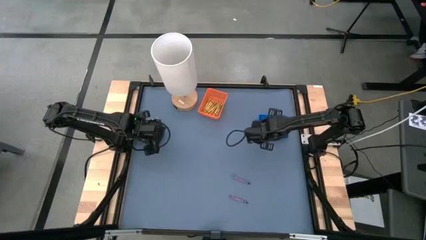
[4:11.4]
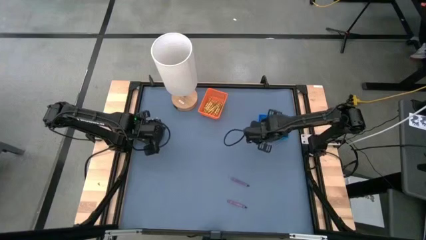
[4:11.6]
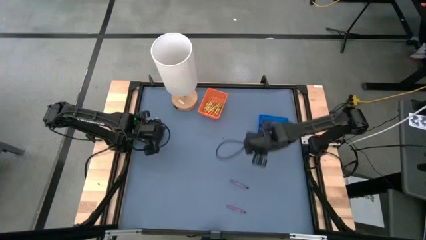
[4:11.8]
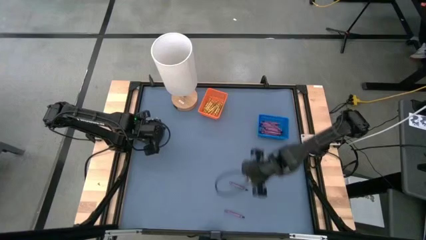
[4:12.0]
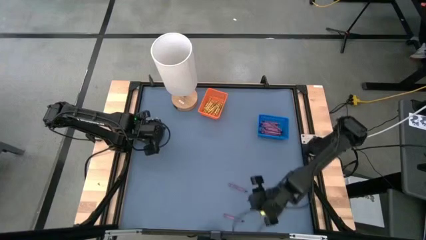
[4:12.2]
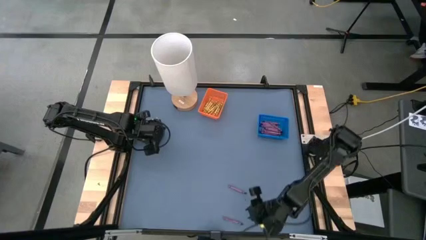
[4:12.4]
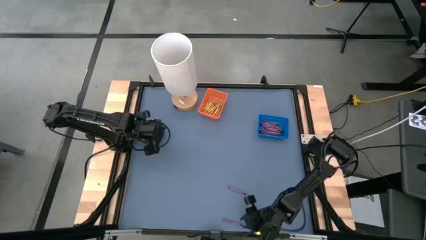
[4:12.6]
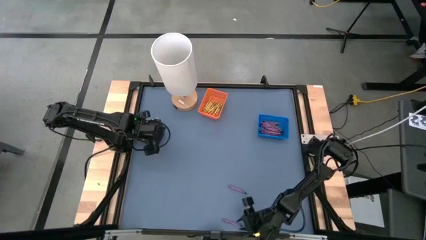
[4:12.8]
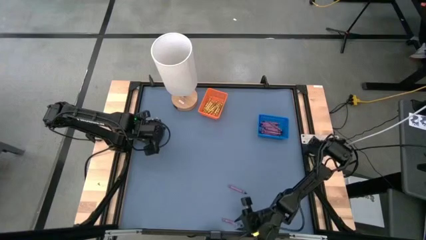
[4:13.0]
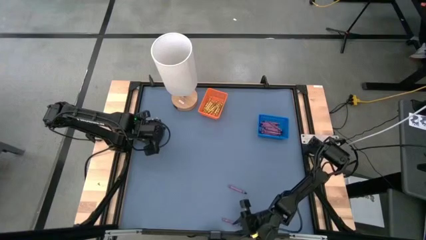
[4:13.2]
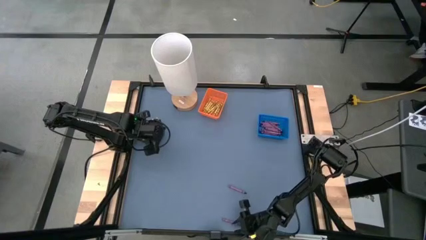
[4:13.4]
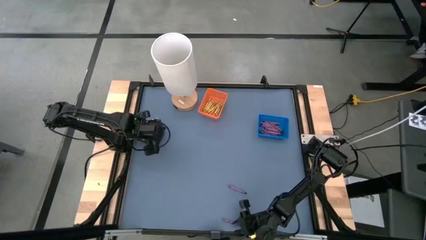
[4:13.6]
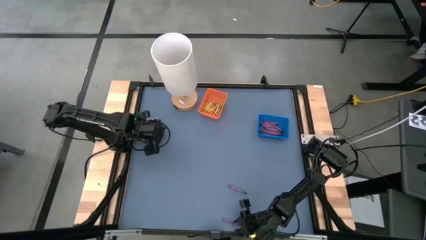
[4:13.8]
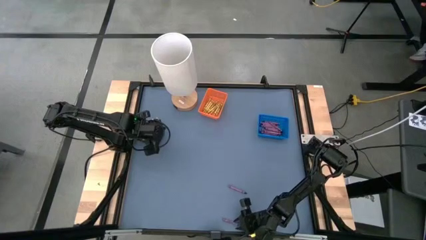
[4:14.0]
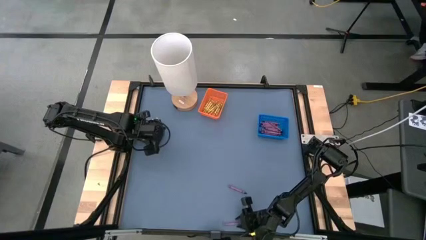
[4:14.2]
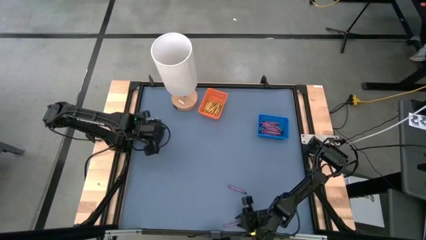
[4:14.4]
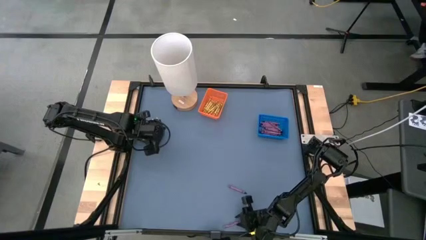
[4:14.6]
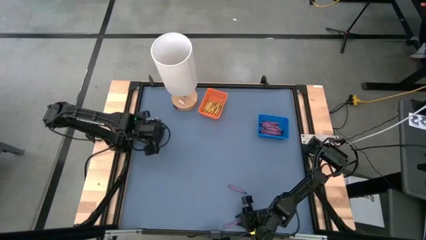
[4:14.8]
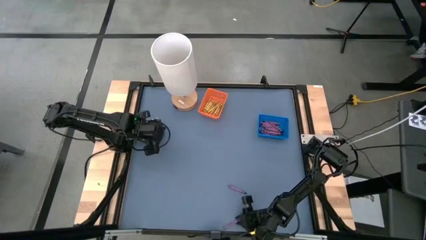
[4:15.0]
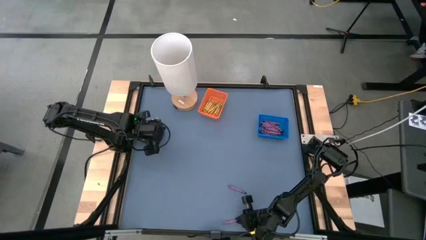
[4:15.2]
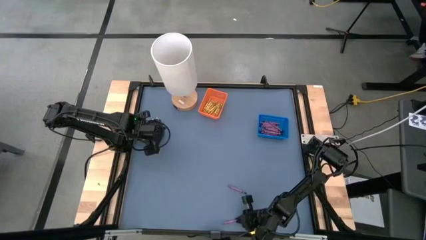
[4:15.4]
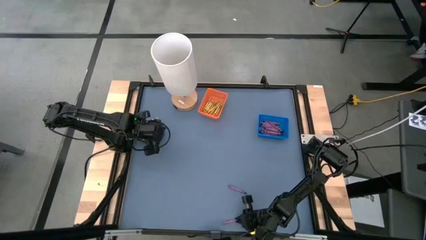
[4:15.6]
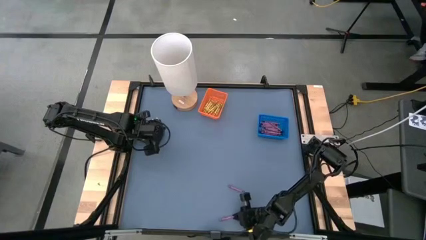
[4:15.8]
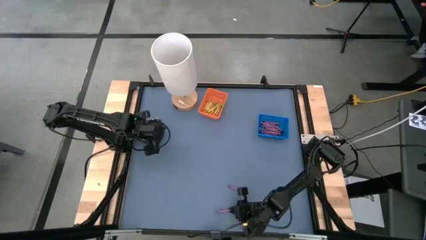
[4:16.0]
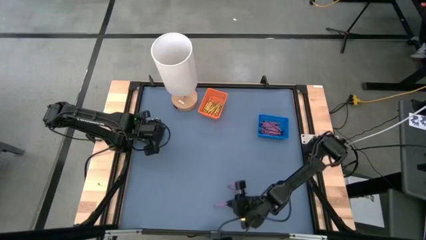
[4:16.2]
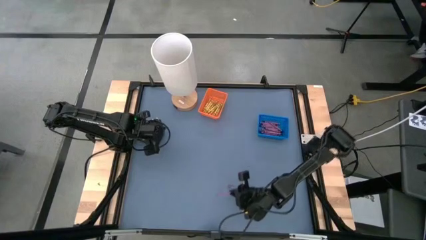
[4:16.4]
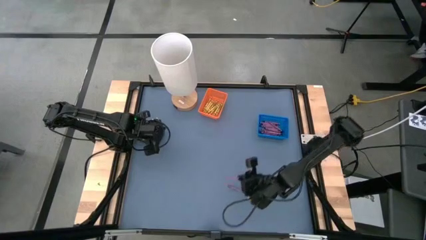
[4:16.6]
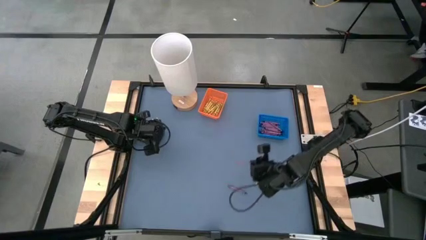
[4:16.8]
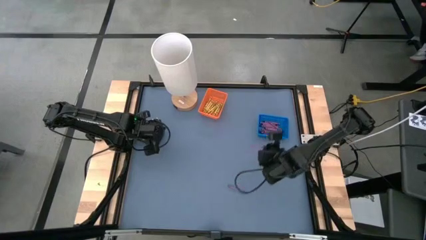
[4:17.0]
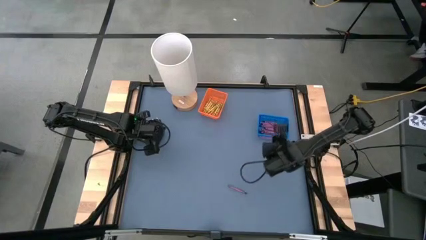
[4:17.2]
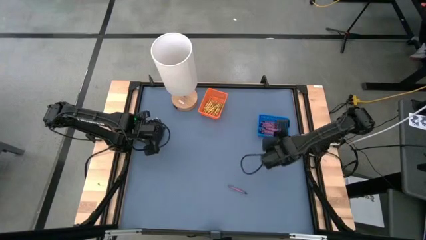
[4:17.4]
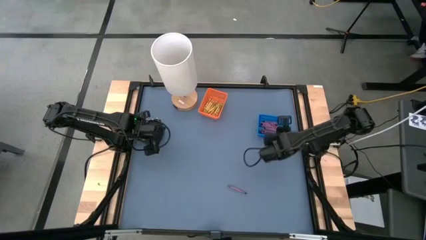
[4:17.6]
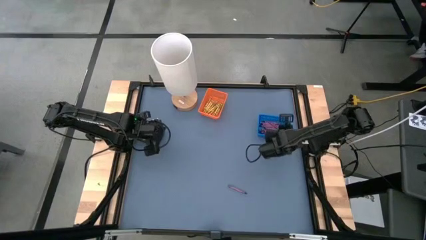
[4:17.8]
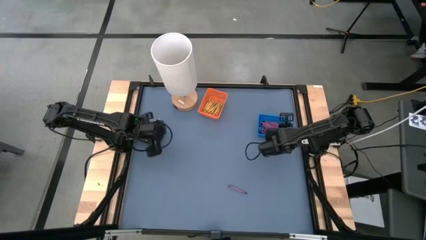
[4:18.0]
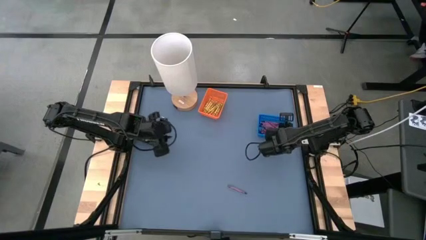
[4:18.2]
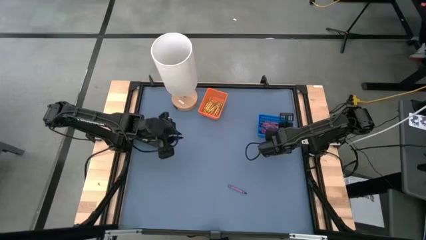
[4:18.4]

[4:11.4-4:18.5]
Task: Sort crayons
Put the violet crayon into the blue basket

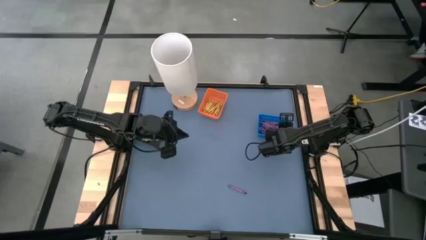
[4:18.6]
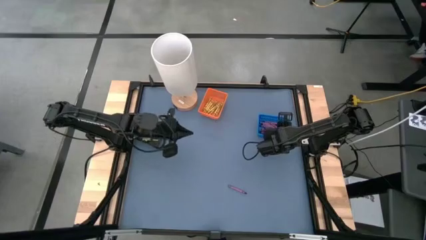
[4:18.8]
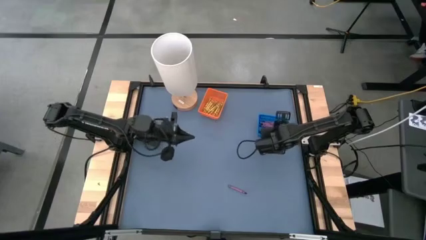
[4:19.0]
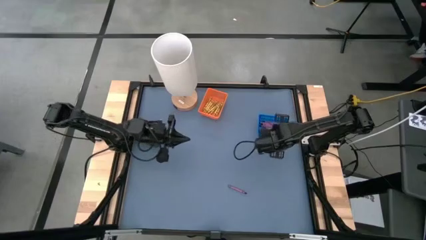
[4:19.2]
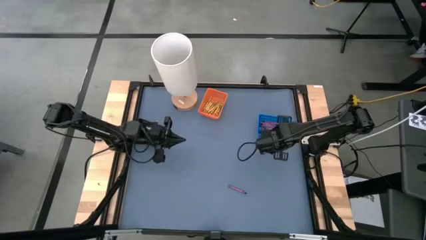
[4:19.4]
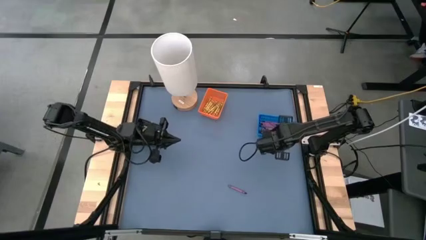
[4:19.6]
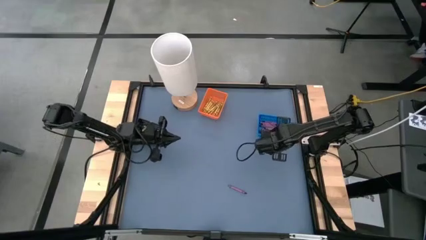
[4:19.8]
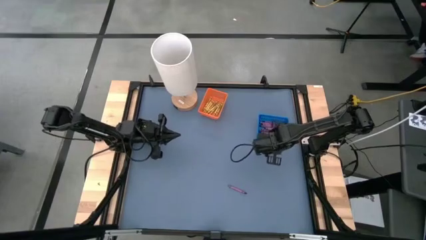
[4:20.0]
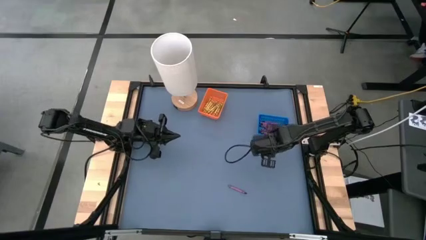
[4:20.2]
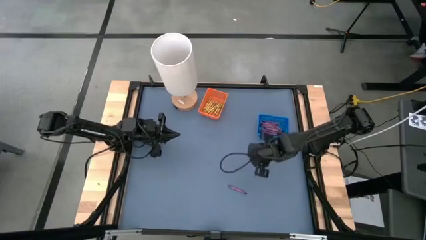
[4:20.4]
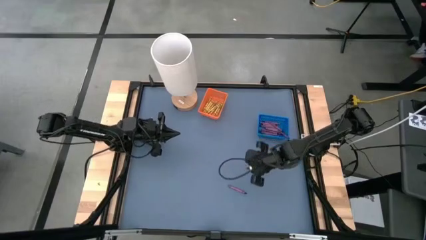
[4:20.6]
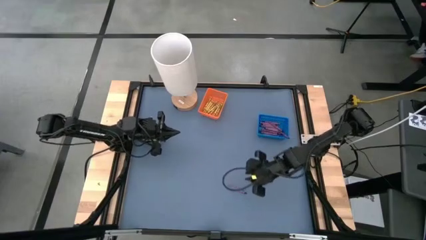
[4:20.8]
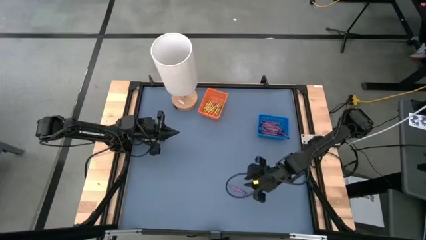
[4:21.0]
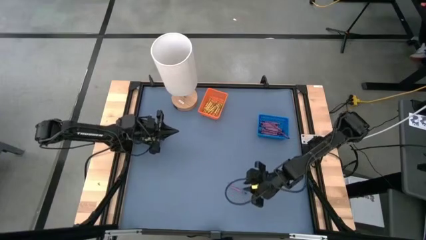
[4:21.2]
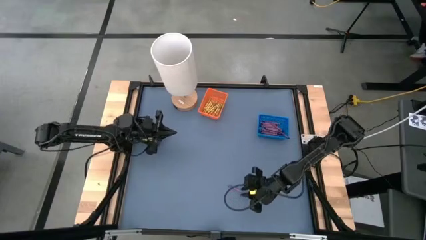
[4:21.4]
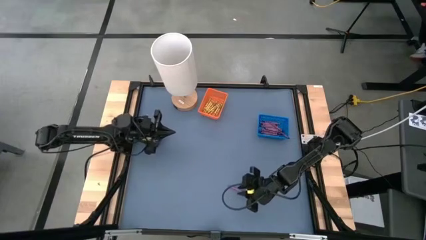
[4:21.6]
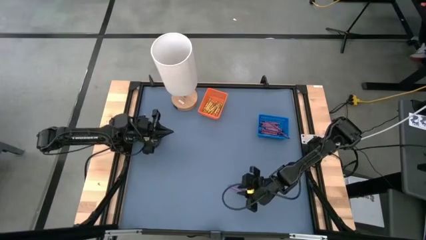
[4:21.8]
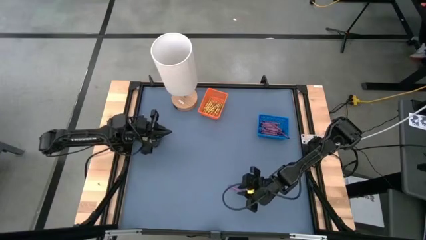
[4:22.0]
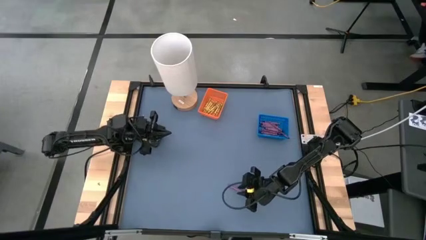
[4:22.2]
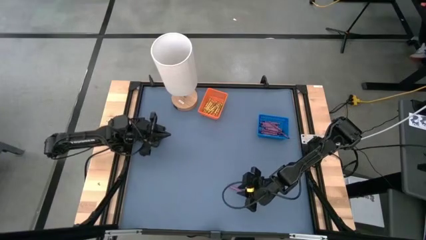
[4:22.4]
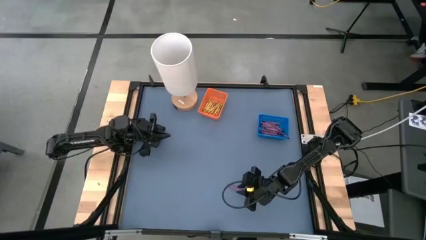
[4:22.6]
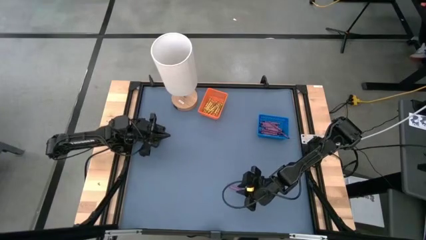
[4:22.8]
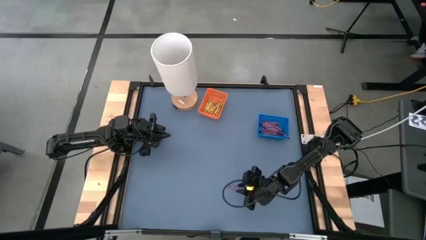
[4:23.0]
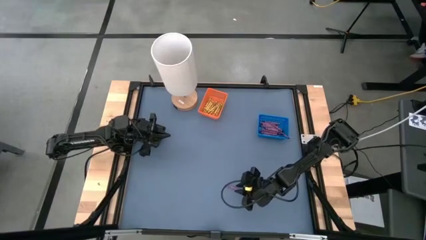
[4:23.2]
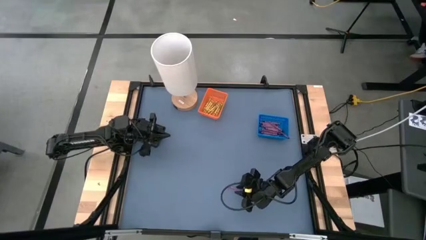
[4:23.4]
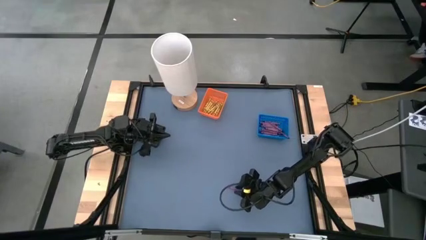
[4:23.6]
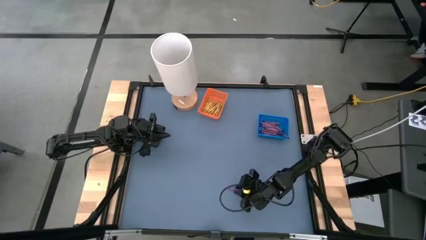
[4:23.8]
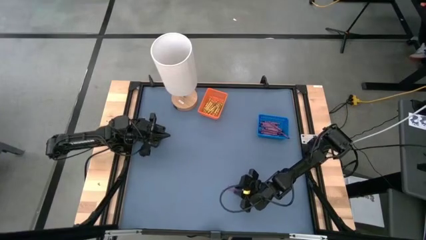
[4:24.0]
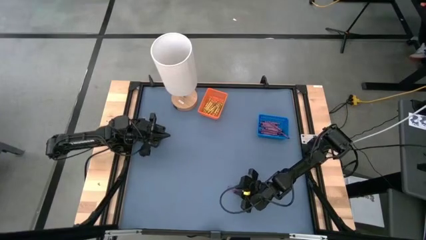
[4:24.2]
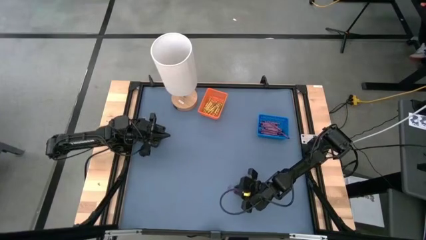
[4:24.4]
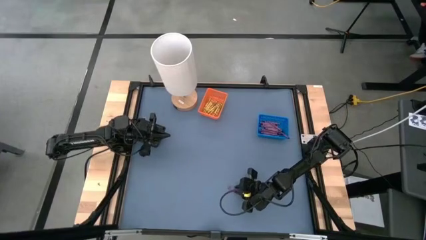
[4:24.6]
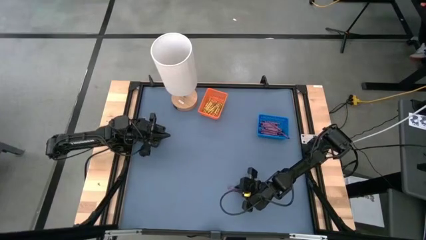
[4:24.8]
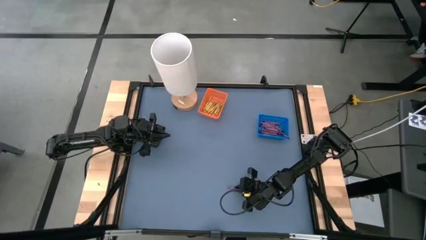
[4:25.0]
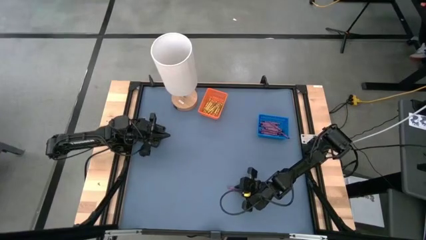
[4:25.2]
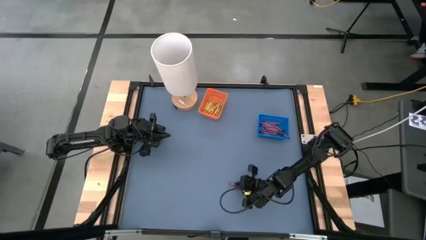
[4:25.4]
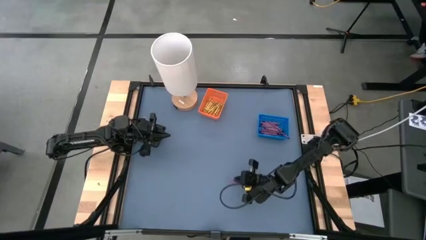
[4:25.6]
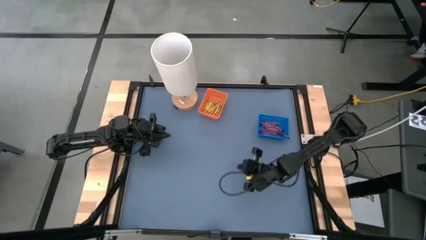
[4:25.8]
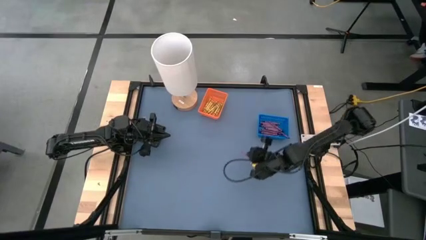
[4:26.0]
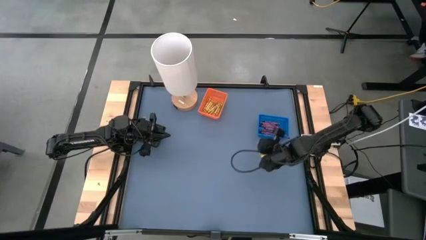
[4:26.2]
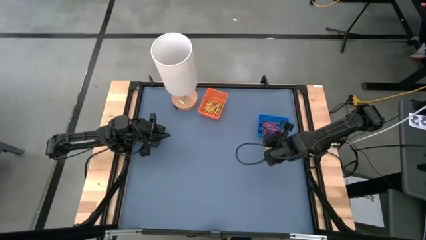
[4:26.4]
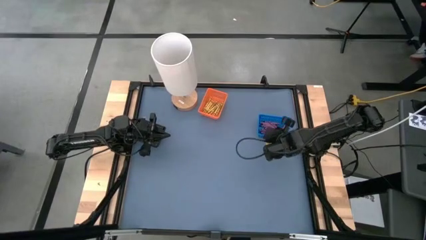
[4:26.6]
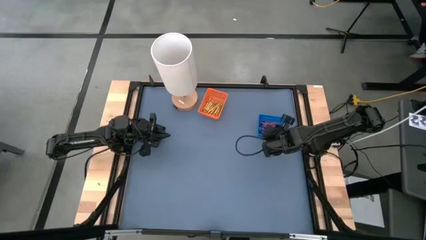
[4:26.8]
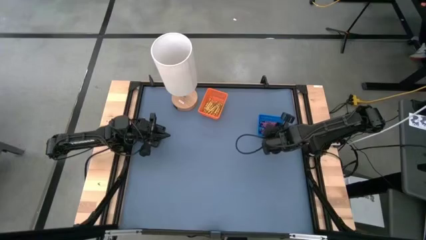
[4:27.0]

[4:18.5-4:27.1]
Put the violet crayon into the blue basket
